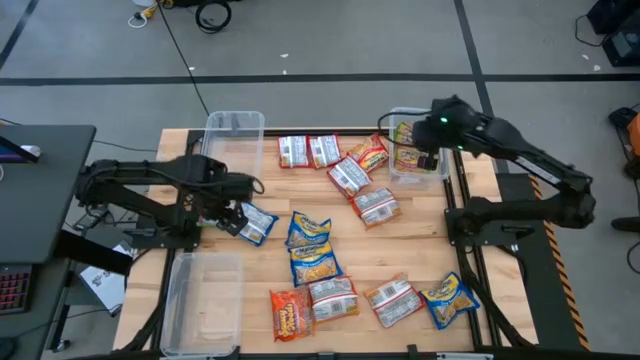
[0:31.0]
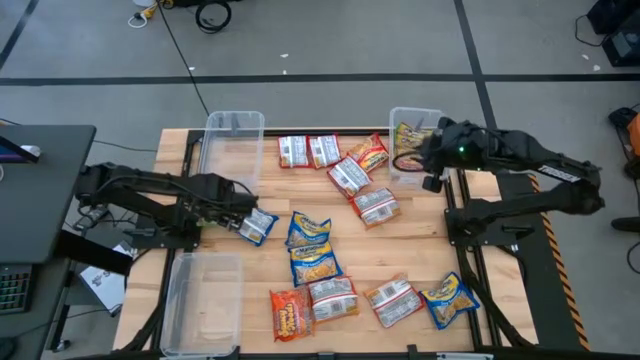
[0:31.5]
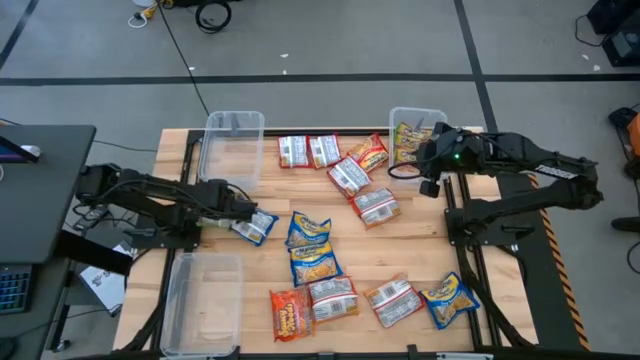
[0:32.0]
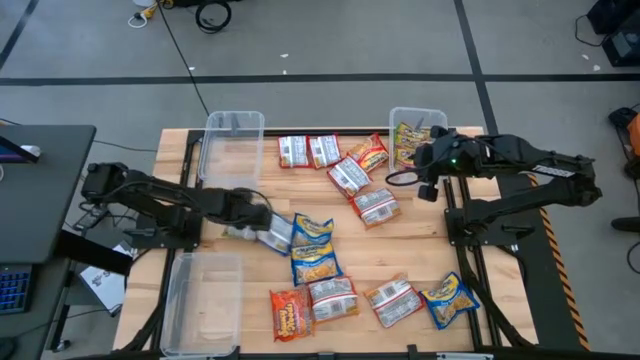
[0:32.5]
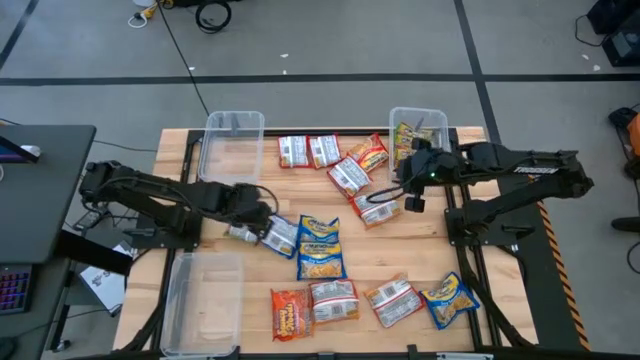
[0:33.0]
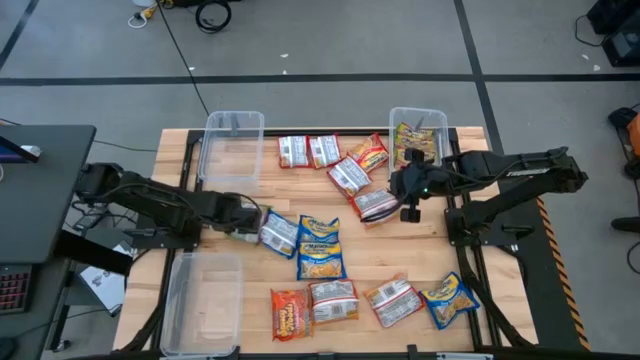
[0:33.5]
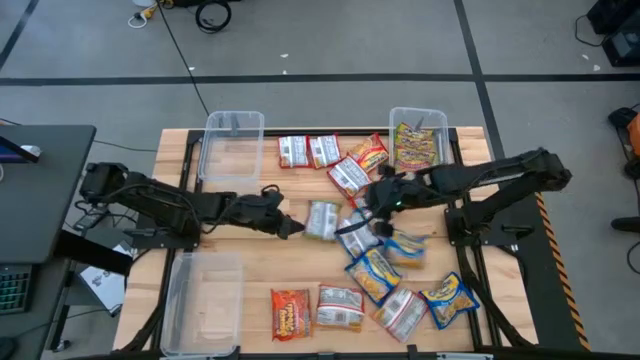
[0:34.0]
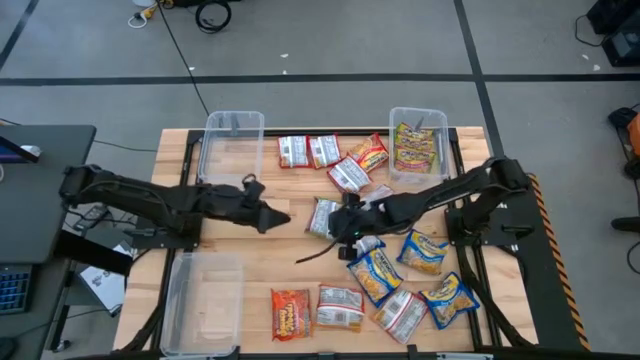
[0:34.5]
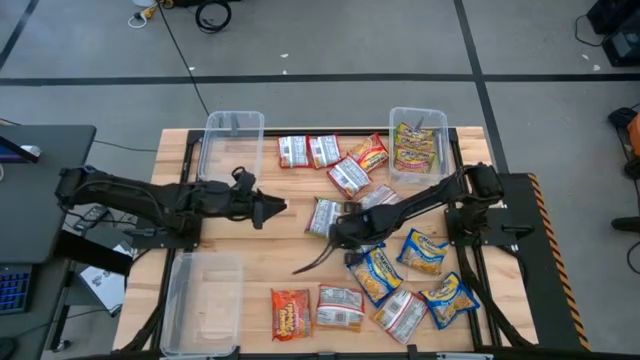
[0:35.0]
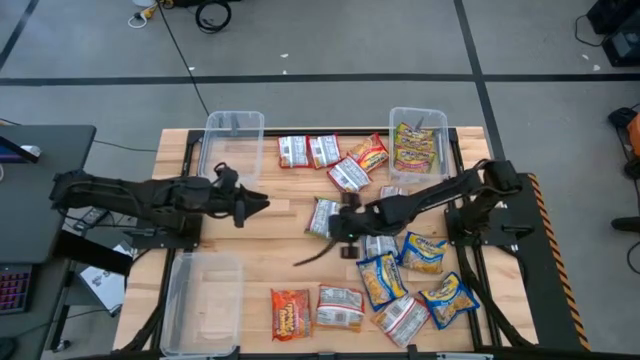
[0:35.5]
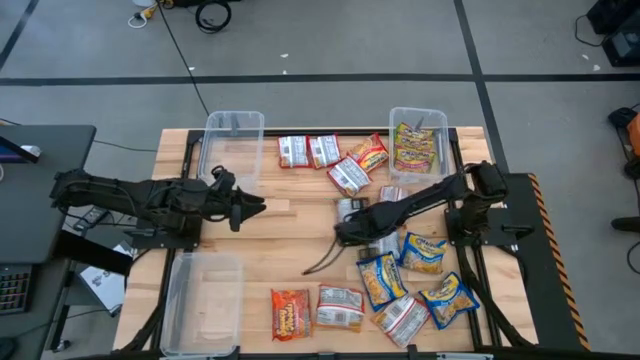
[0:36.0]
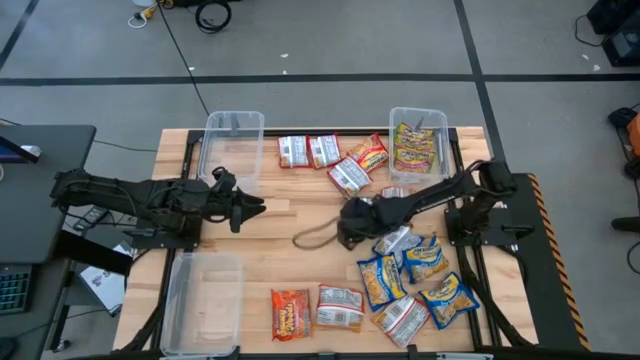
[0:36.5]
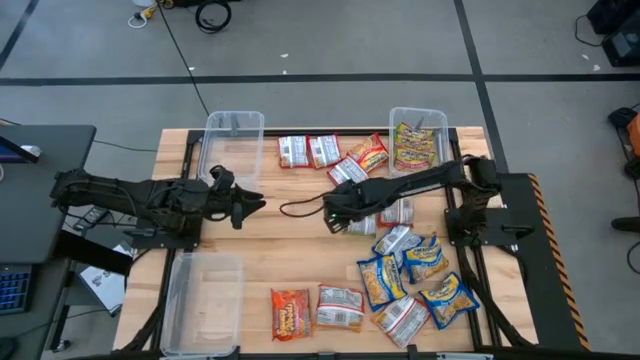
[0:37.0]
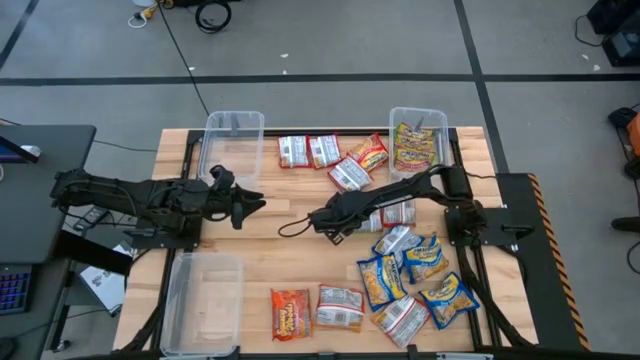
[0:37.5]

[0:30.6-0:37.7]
Task: Sort Maruchan noodles
Adjust the noodle packs on the table

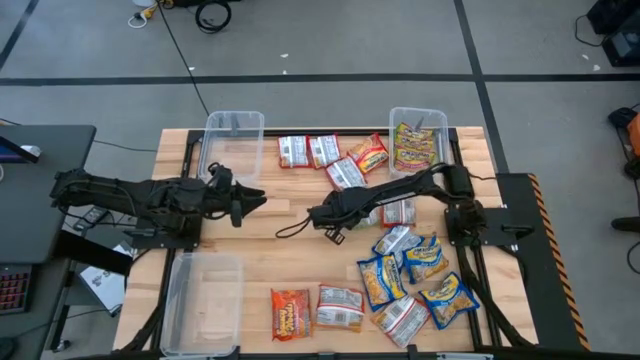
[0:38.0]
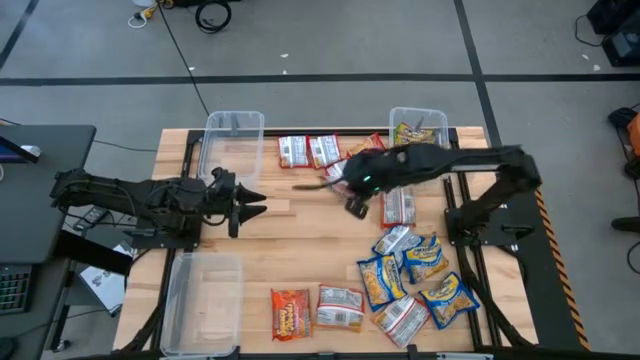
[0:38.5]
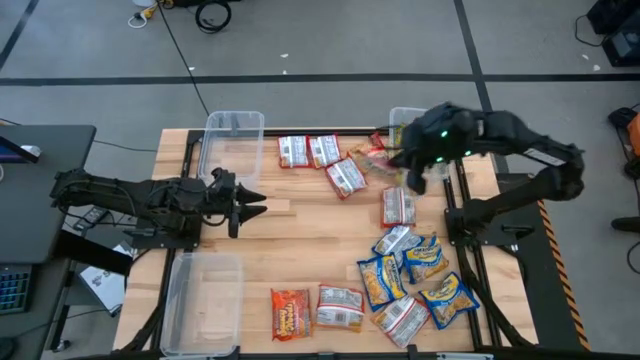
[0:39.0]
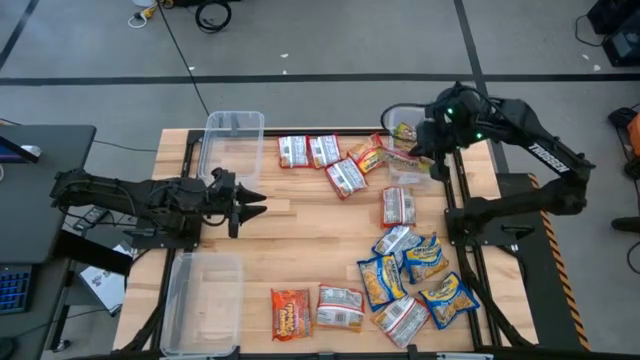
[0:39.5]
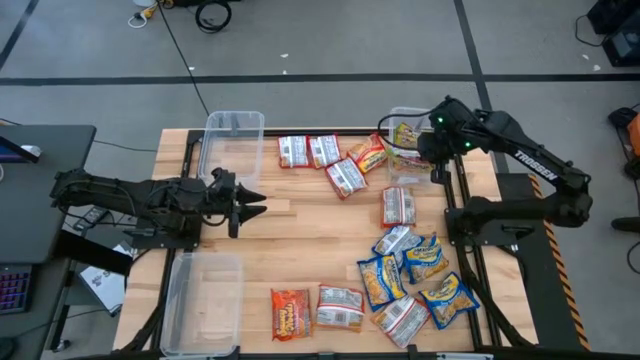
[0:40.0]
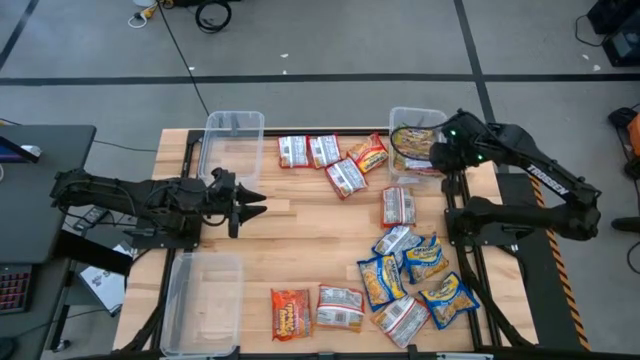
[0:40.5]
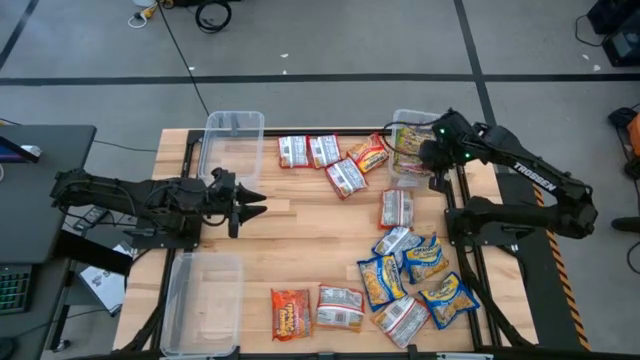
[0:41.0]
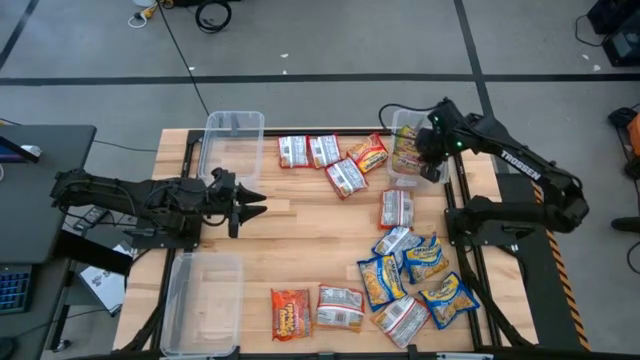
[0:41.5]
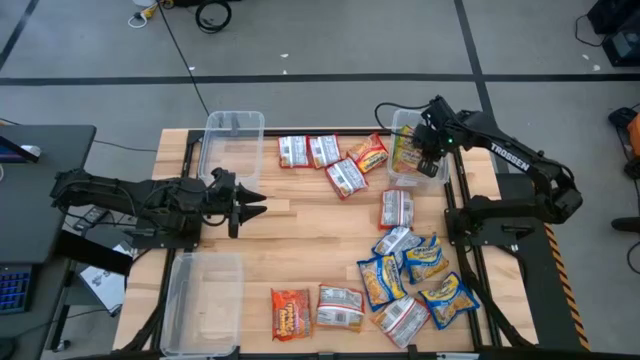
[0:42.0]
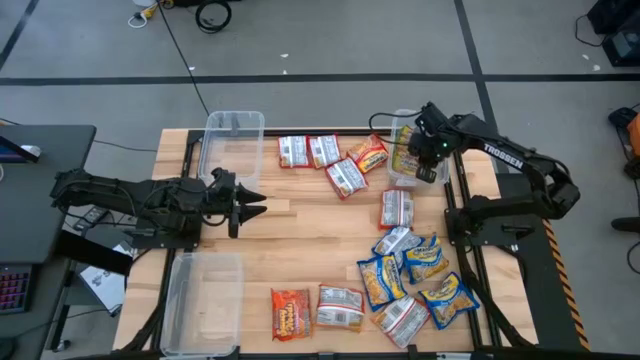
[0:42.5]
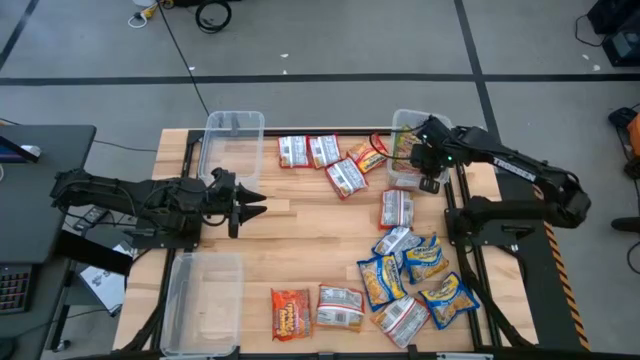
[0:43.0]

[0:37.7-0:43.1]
Put the green noodle pack into the top right transparent bin

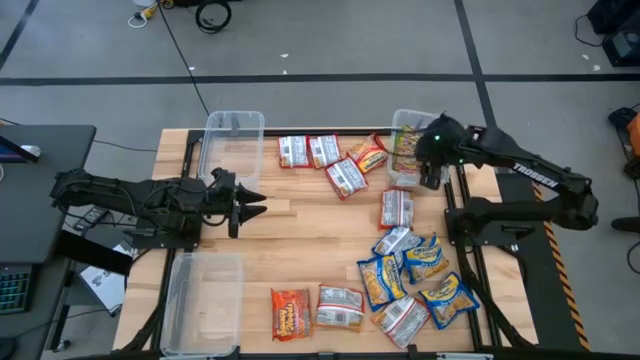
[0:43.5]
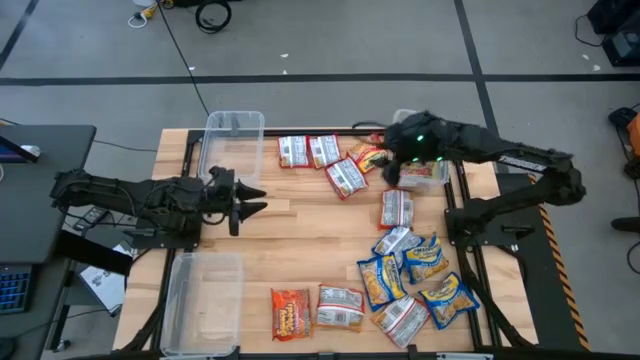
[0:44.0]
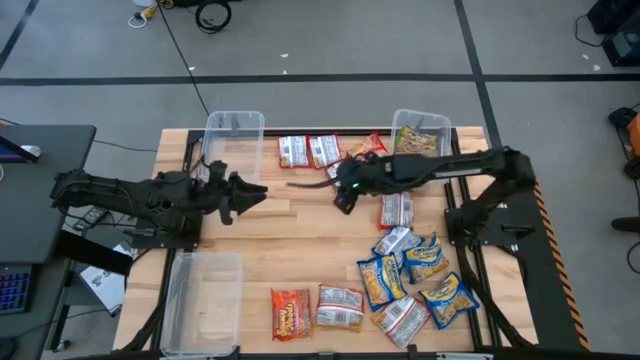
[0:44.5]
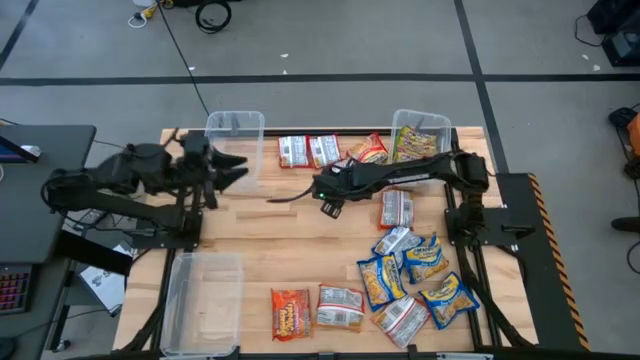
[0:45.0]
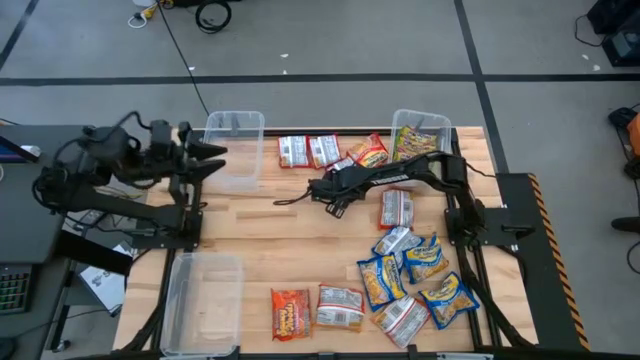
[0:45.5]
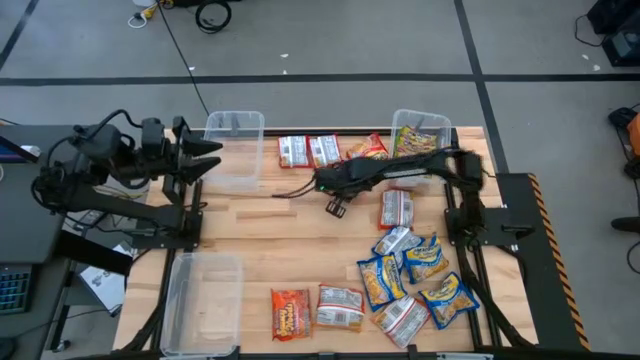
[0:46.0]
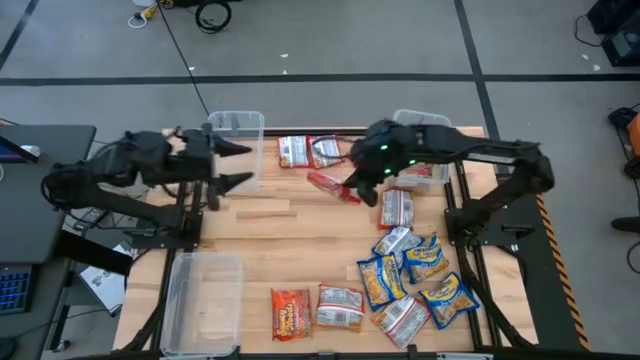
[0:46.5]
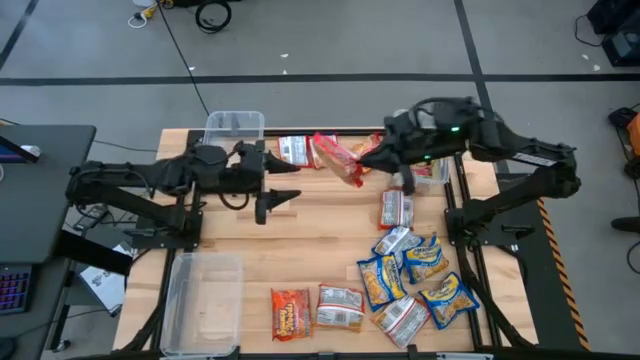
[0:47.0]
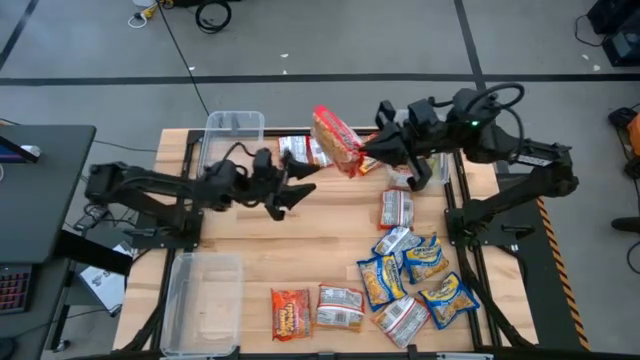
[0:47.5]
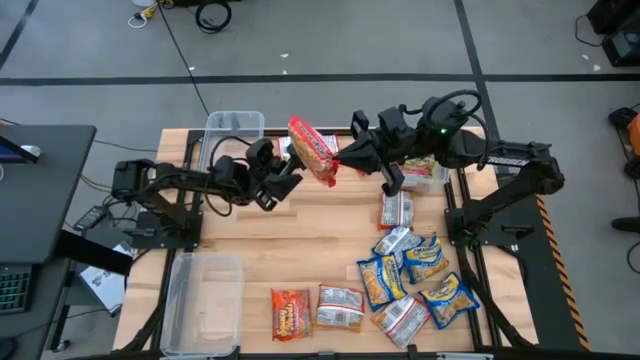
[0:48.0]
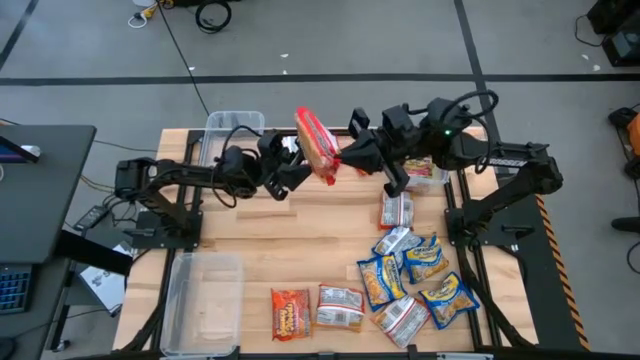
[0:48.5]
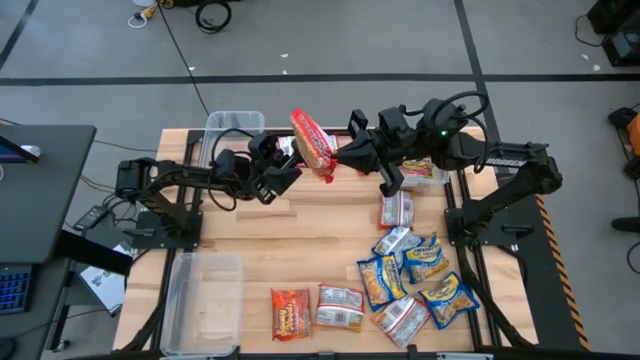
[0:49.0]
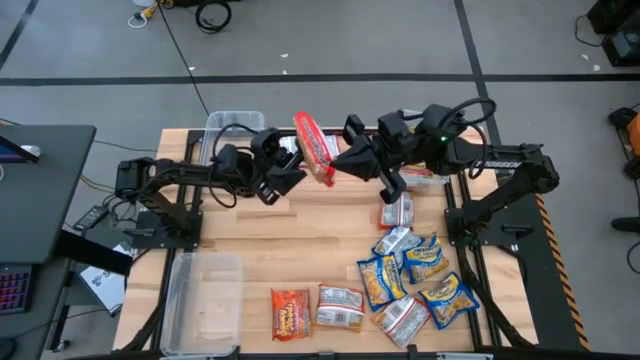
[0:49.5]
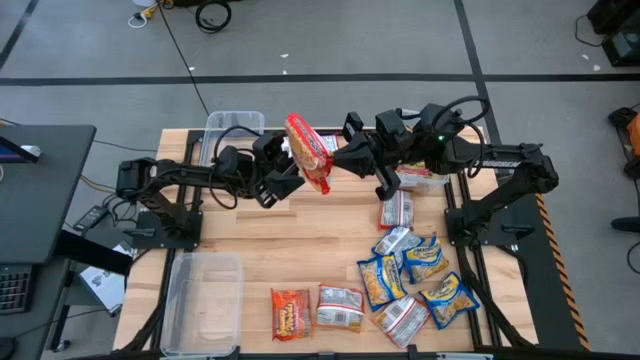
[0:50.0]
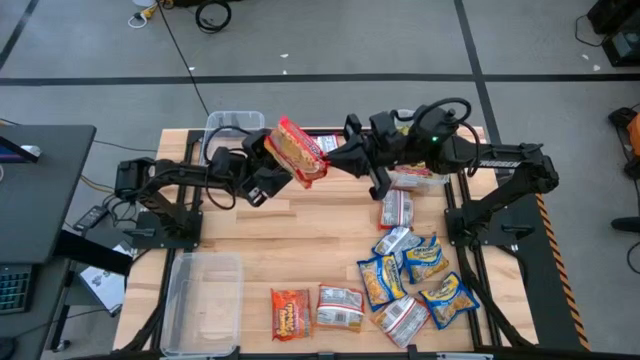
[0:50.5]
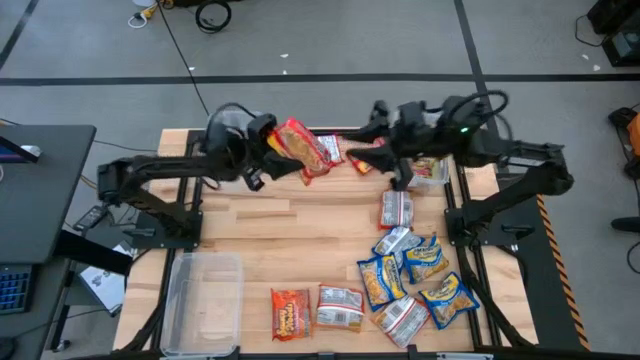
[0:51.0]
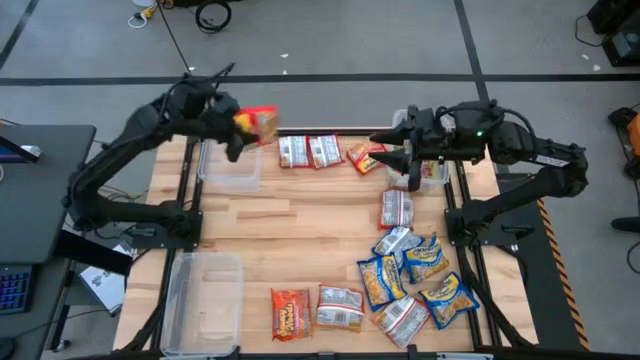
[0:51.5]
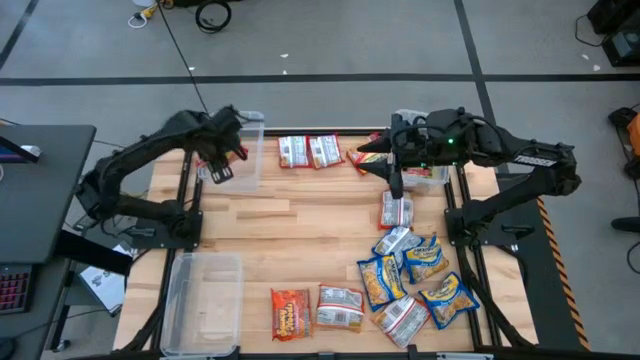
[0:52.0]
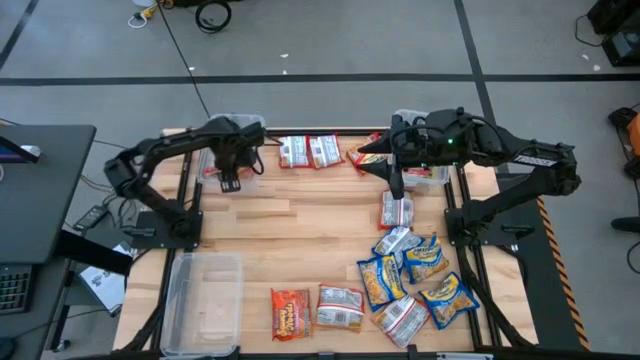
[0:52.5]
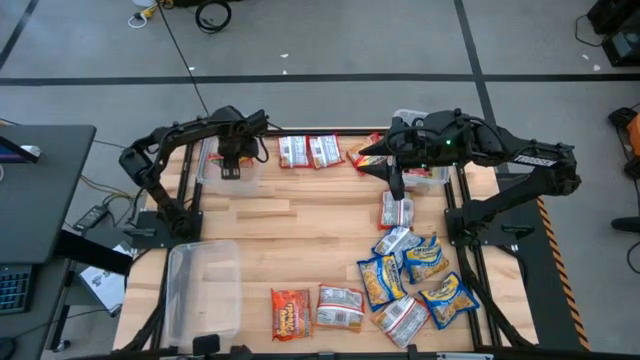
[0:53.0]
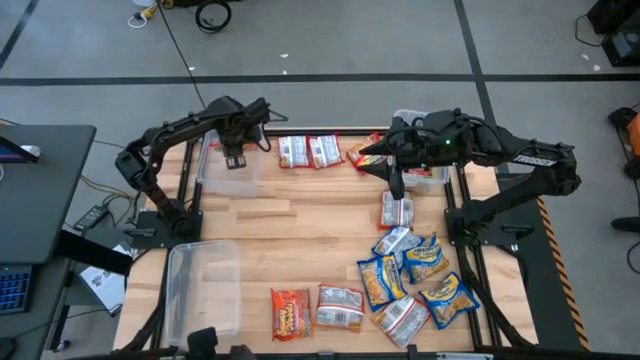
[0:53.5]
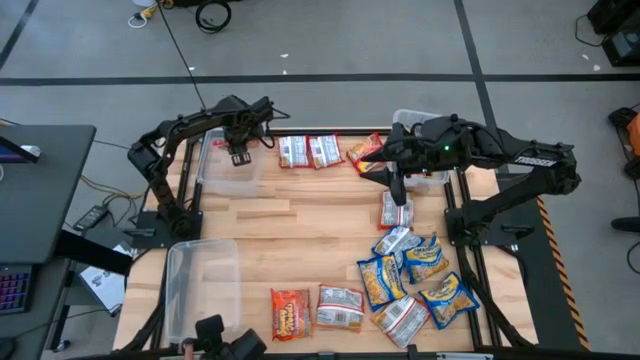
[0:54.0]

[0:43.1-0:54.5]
Put the orange noodle pack into the top left transparent bin
